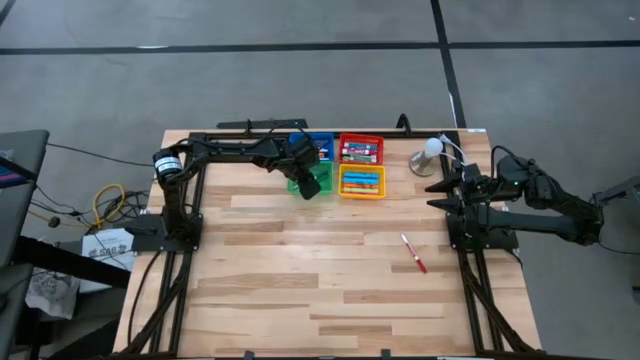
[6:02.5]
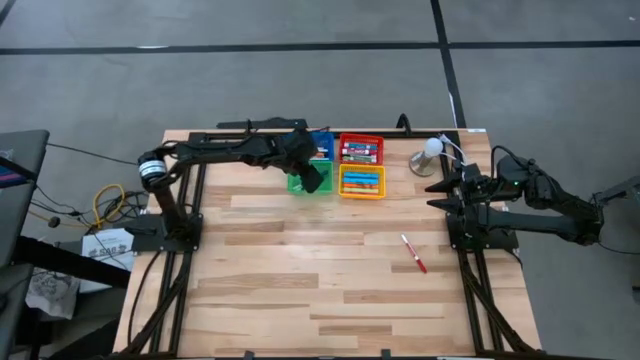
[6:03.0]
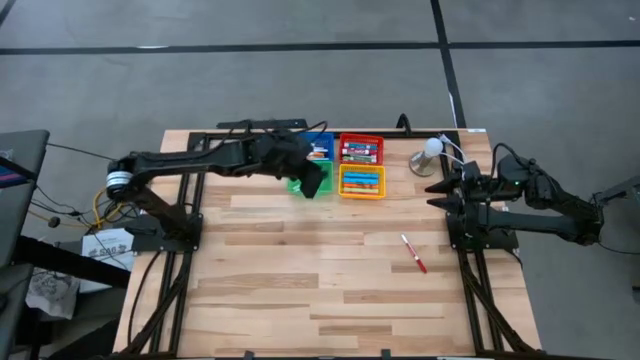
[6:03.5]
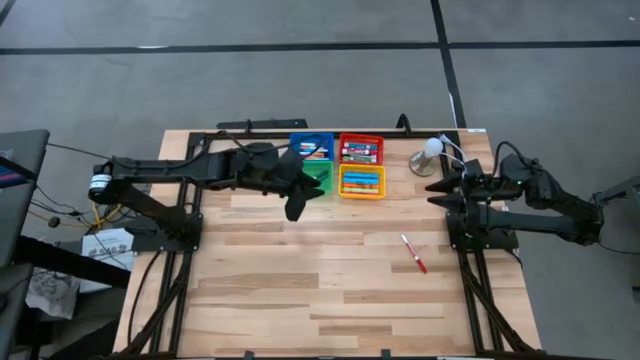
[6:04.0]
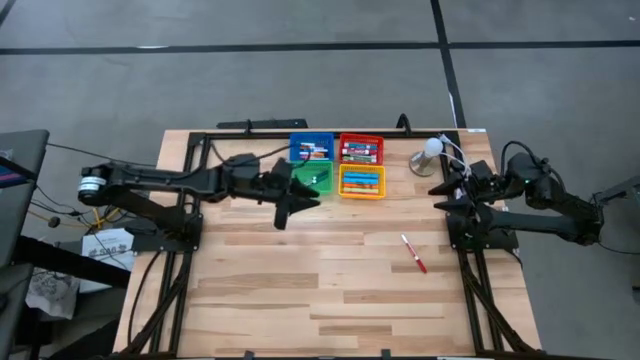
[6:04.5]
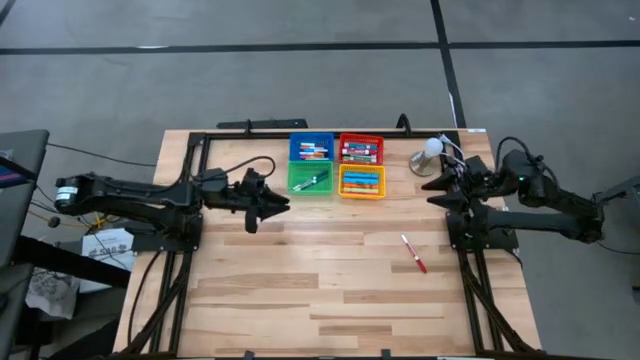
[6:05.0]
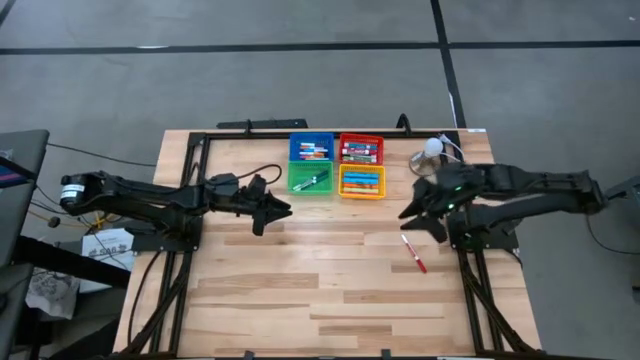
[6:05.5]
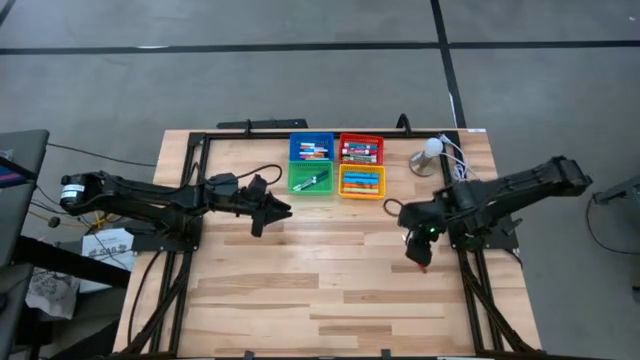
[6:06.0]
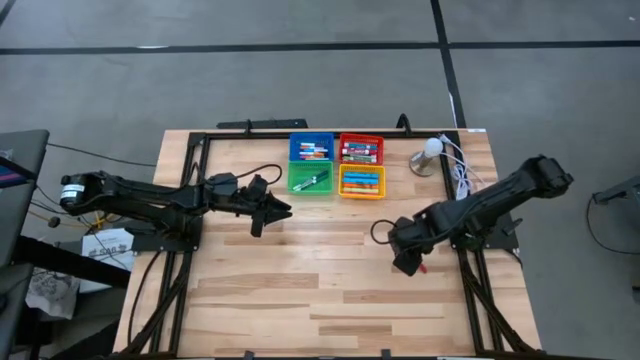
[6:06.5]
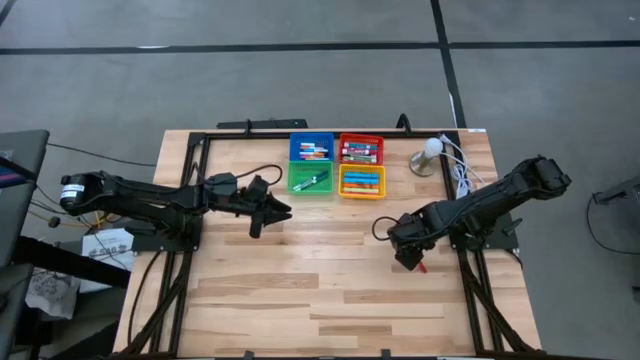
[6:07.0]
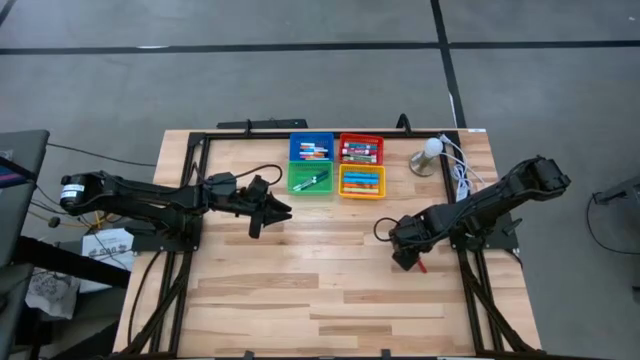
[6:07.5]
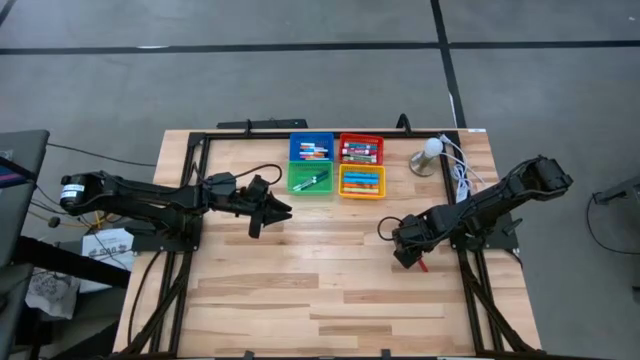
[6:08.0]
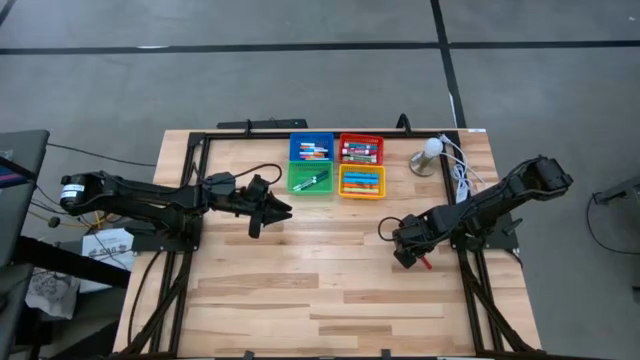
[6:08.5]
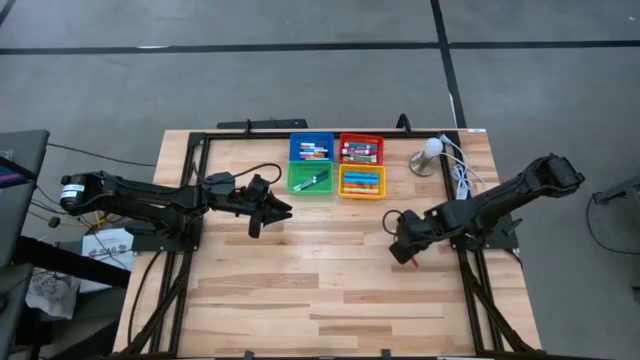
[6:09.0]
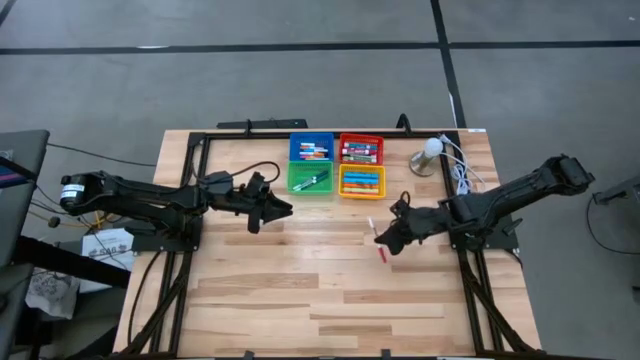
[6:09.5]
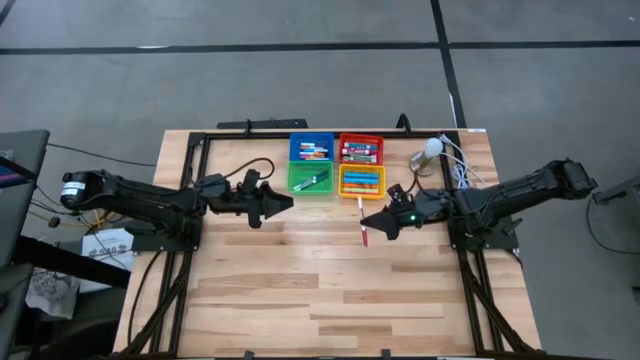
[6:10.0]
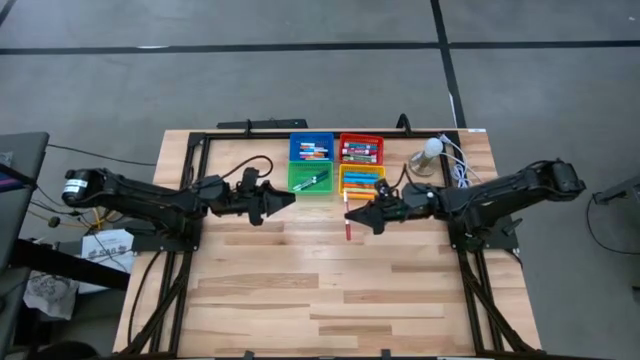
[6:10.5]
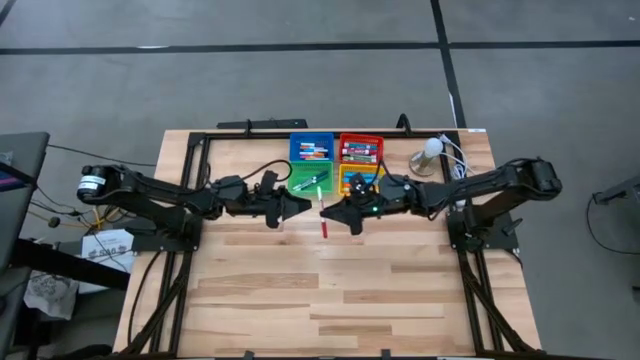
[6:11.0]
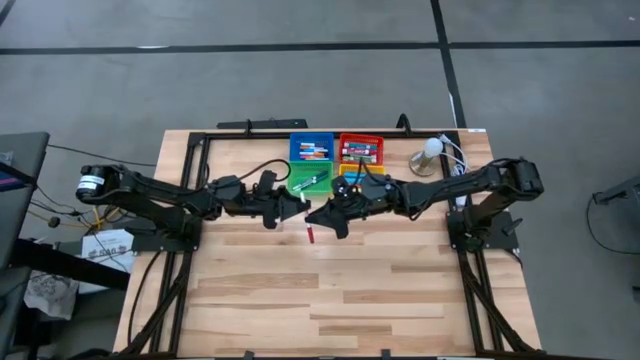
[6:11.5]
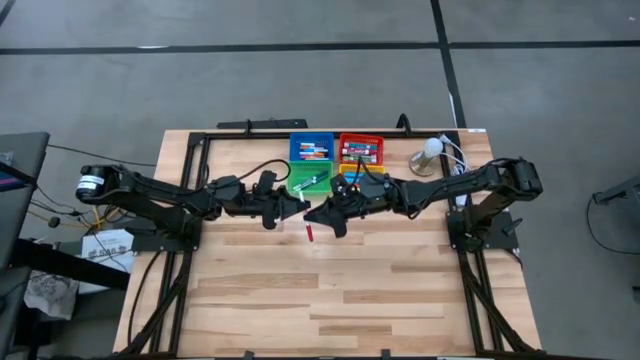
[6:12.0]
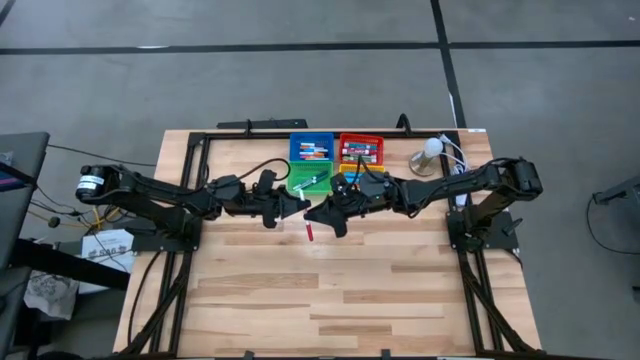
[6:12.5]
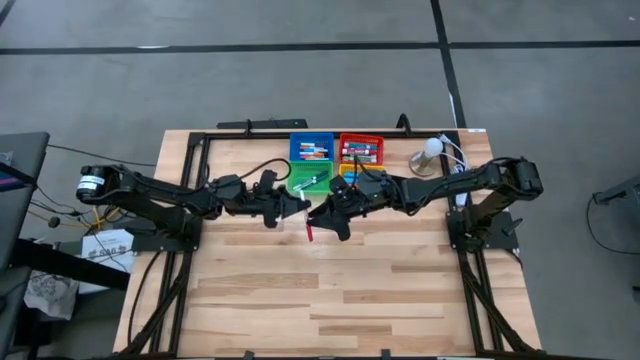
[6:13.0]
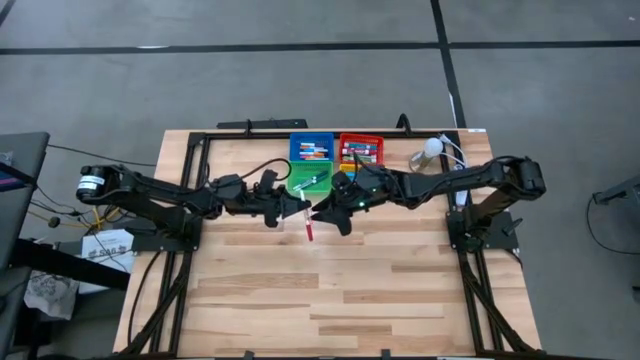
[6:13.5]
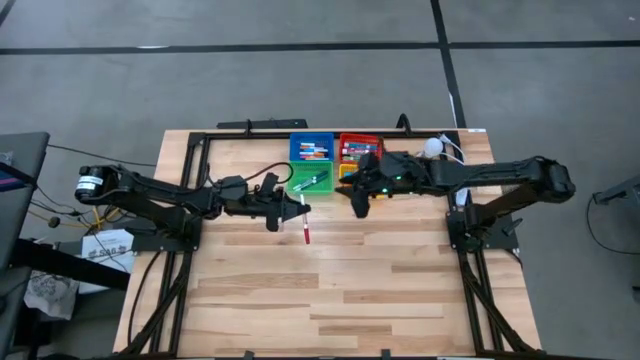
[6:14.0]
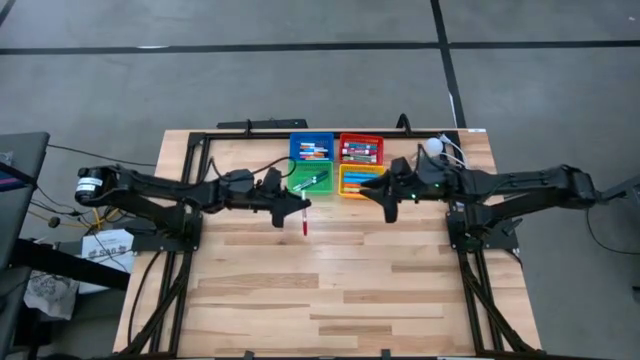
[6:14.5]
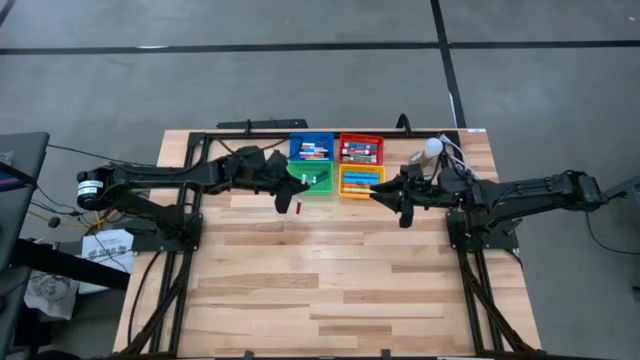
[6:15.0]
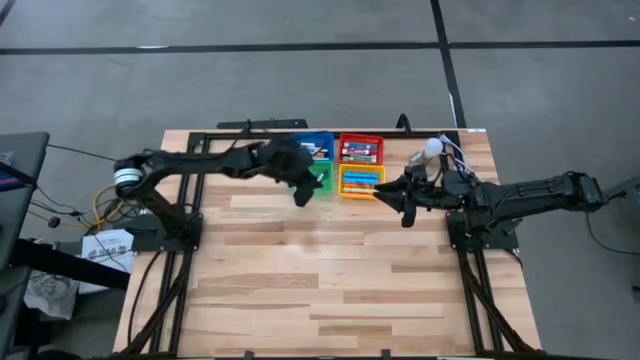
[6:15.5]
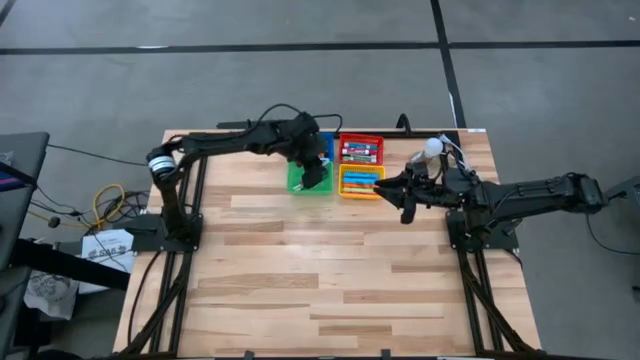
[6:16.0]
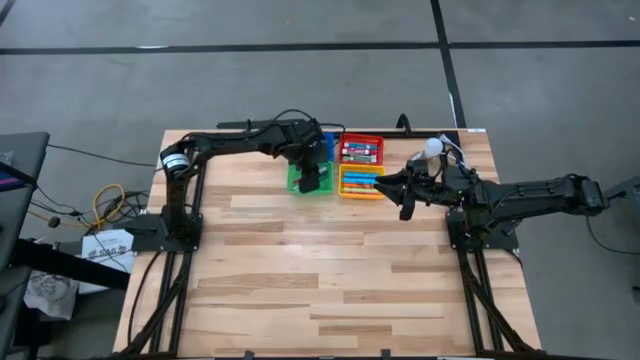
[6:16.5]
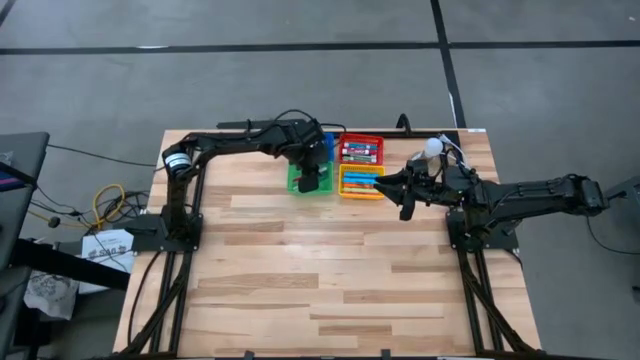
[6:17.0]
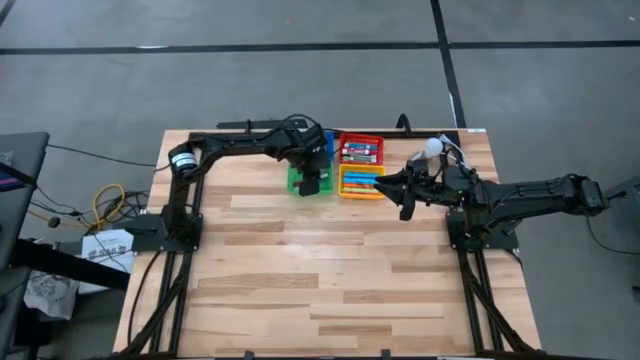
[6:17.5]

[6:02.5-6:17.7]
Task: Pick & Place Markers
Put the small red marker pen into the green bin

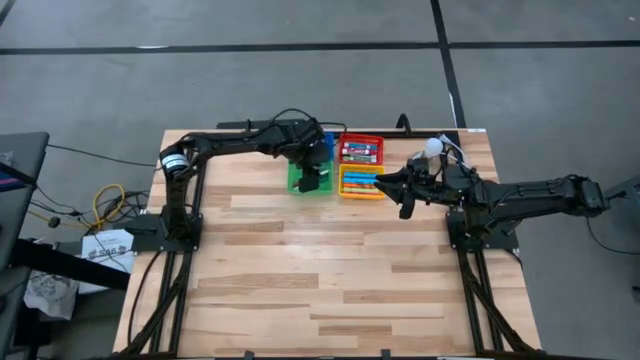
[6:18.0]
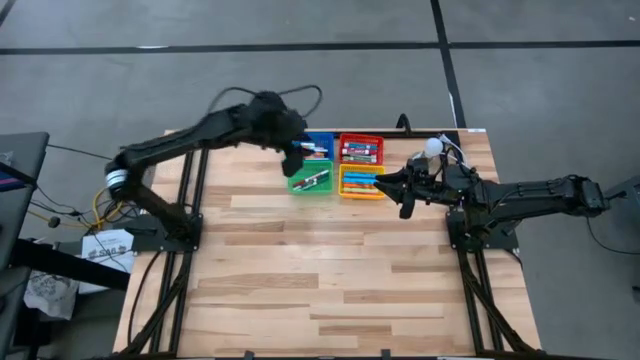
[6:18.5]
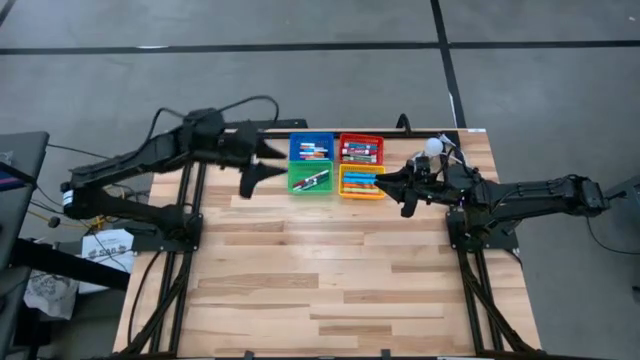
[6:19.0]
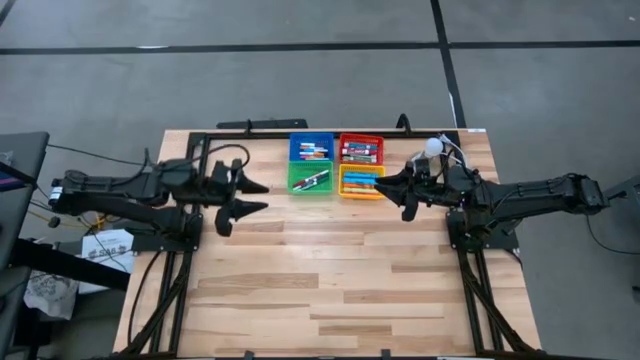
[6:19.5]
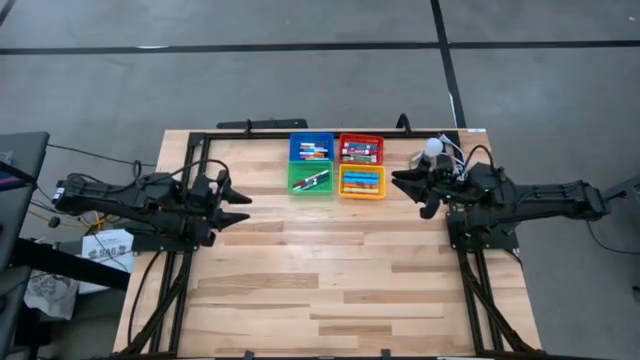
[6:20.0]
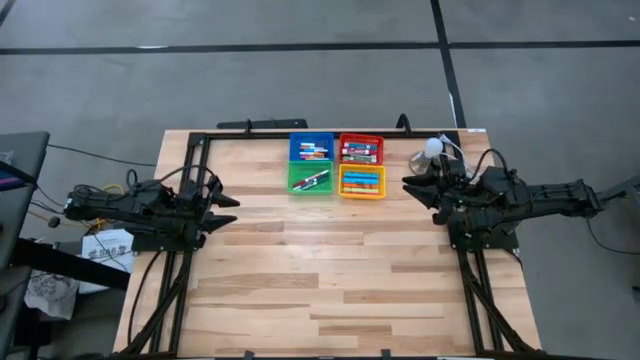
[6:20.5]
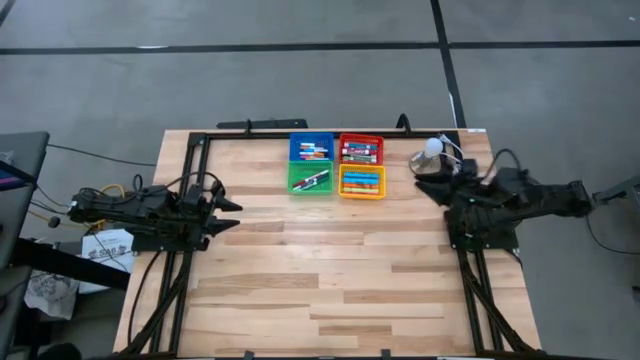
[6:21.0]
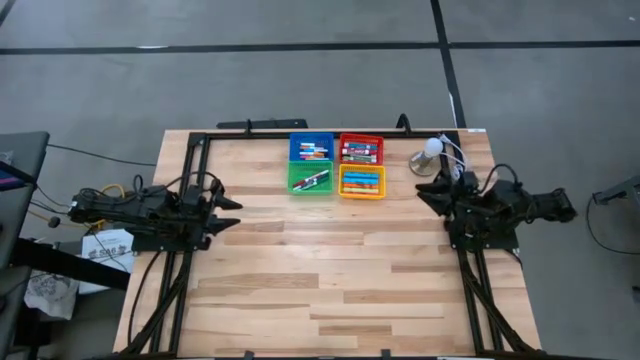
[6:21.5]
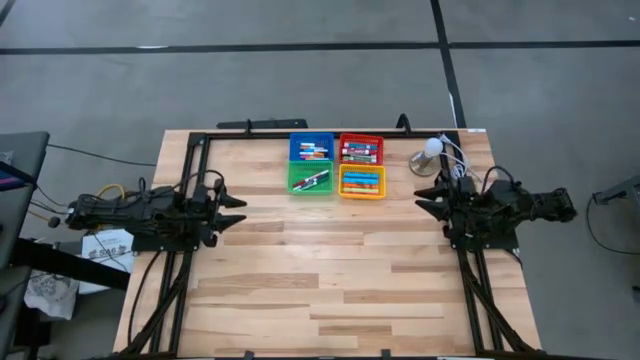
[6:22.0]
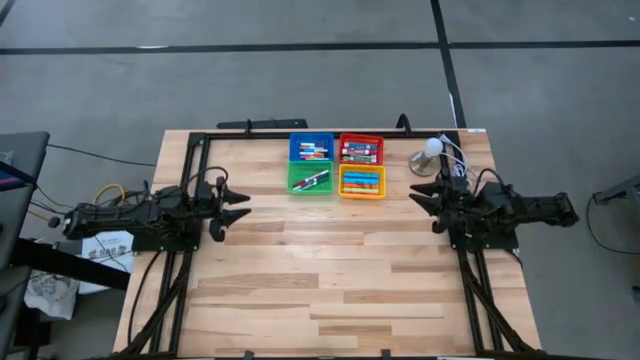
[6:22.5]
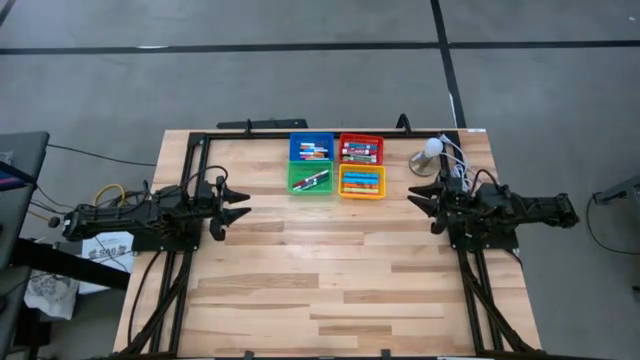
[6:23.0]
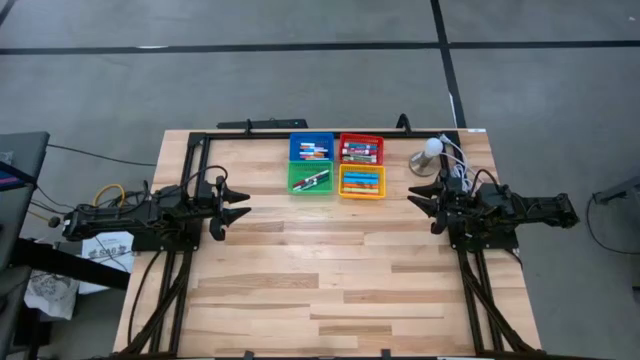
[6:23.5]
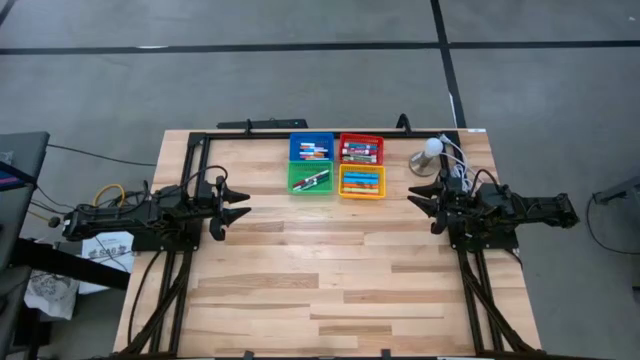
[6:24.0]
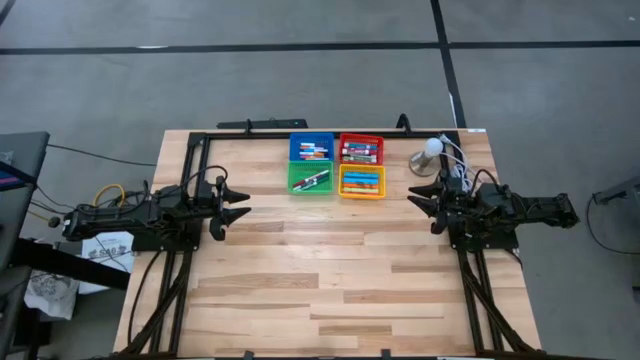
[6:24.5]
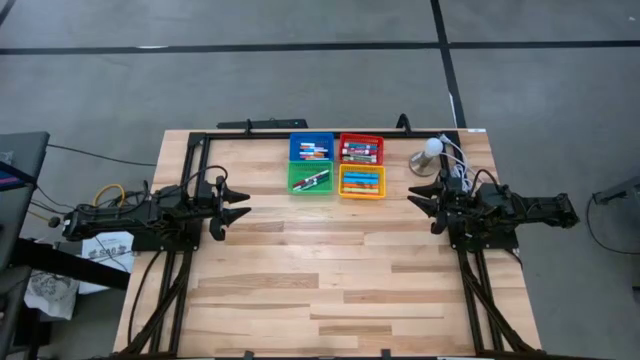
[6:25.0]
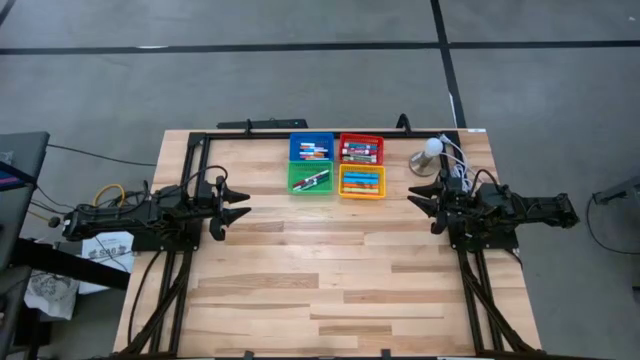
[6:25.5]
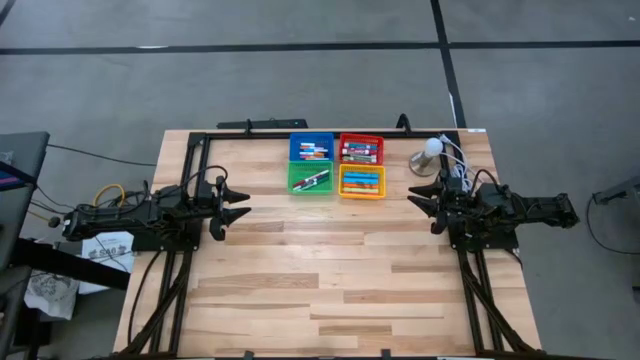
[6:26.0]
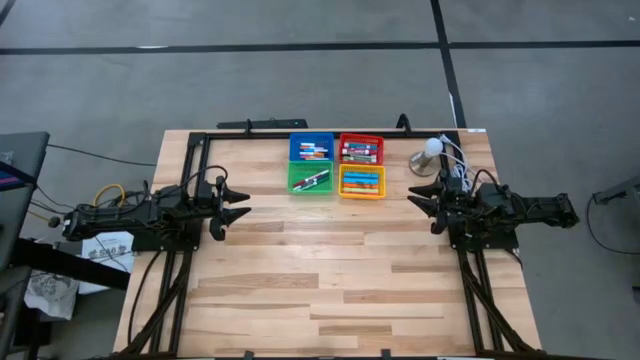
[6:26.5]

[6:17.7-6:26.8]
Return to home position
